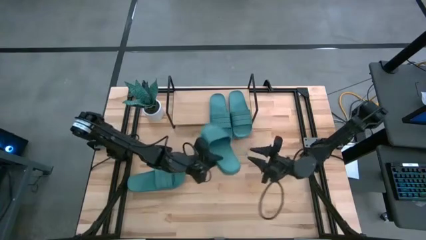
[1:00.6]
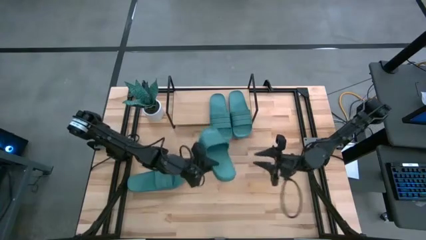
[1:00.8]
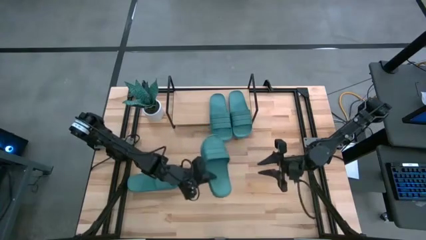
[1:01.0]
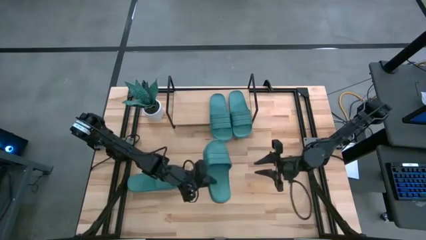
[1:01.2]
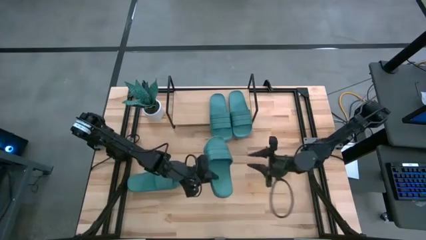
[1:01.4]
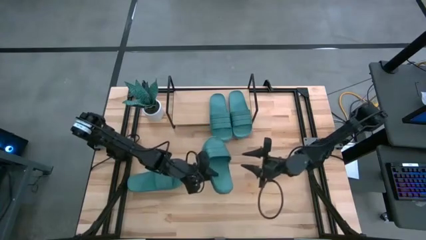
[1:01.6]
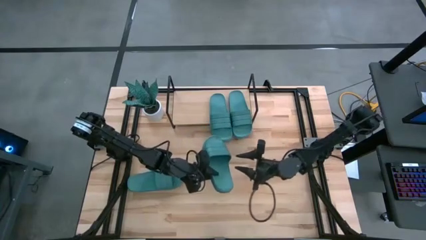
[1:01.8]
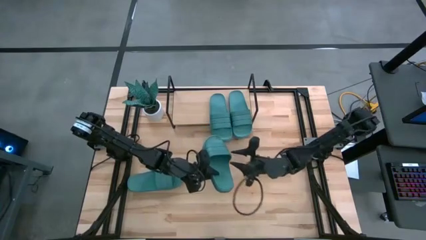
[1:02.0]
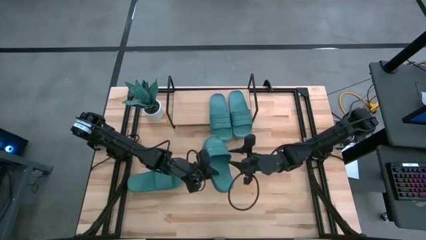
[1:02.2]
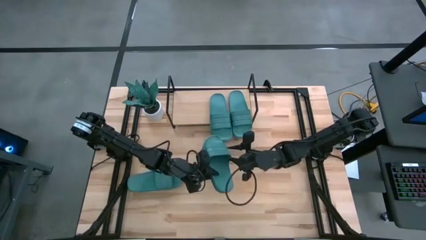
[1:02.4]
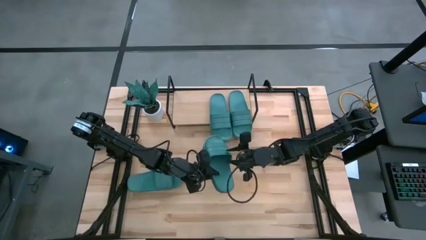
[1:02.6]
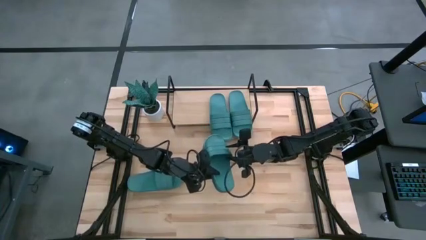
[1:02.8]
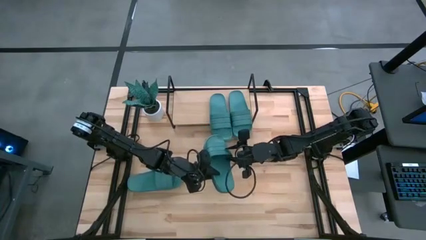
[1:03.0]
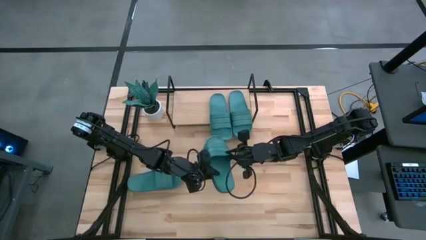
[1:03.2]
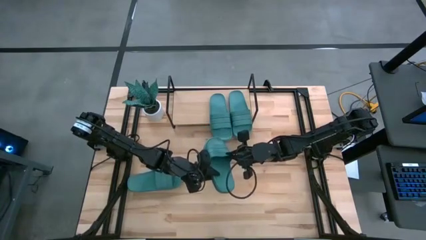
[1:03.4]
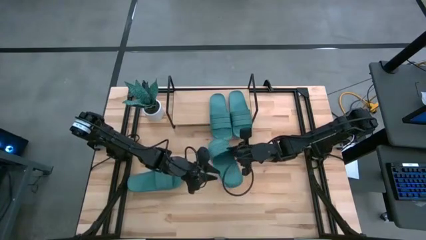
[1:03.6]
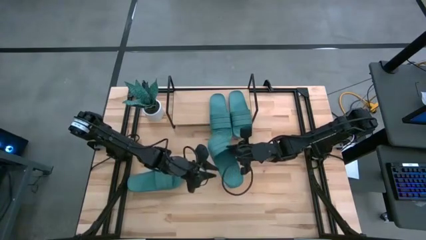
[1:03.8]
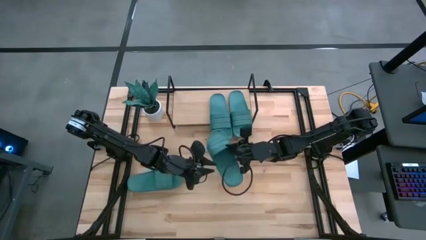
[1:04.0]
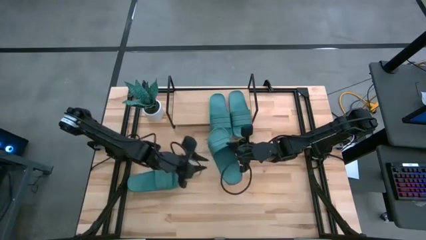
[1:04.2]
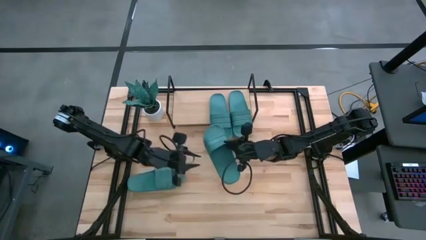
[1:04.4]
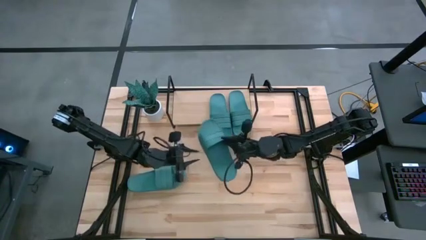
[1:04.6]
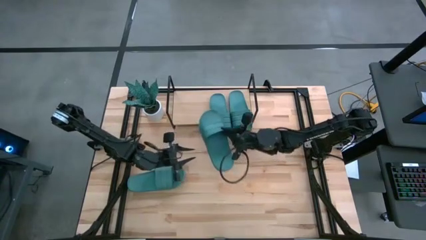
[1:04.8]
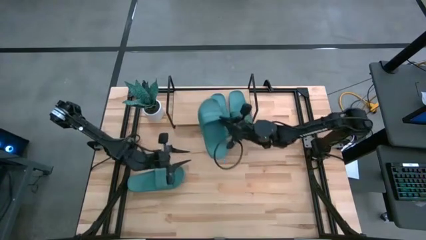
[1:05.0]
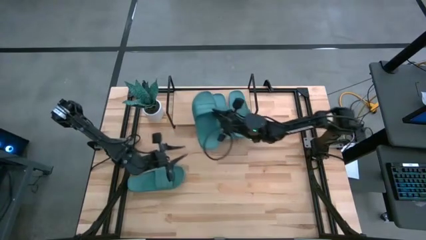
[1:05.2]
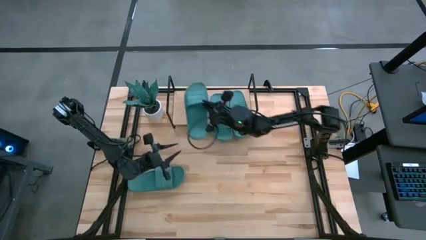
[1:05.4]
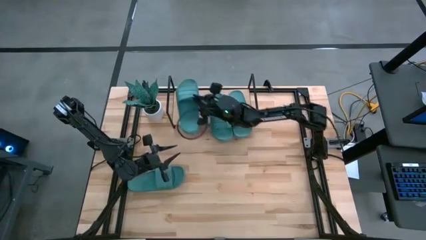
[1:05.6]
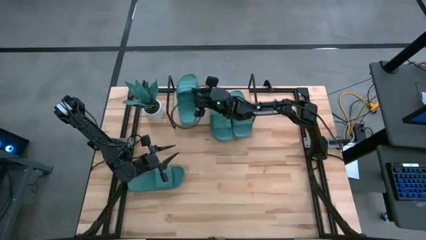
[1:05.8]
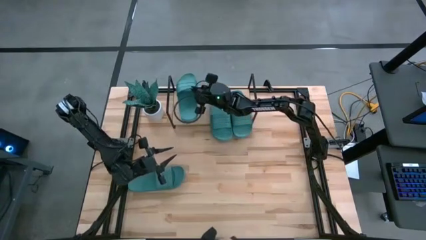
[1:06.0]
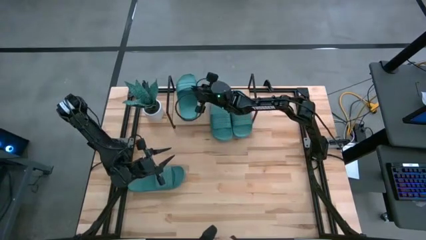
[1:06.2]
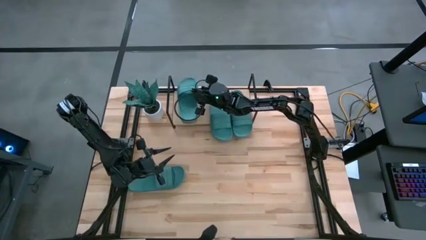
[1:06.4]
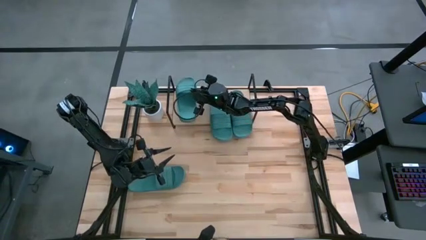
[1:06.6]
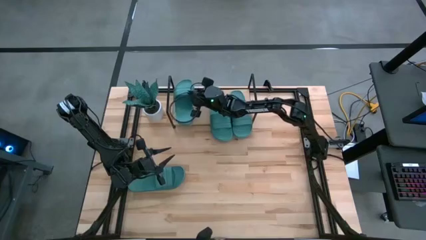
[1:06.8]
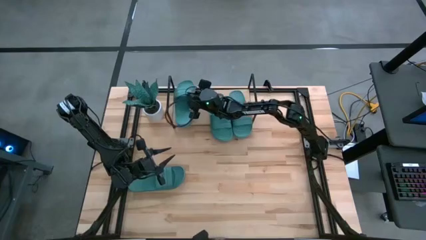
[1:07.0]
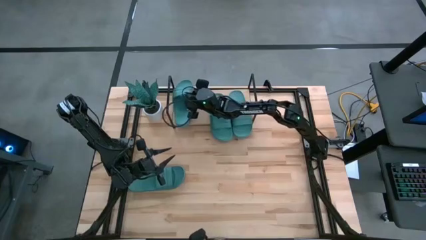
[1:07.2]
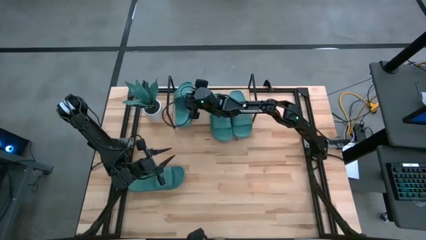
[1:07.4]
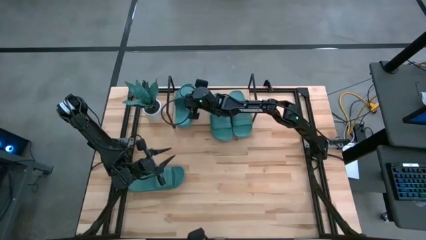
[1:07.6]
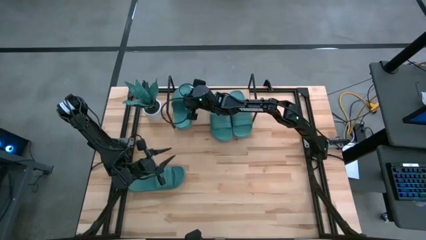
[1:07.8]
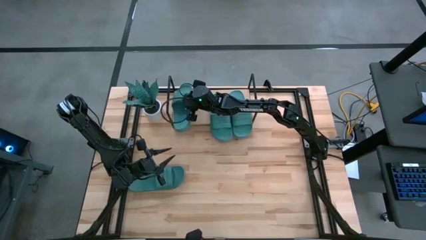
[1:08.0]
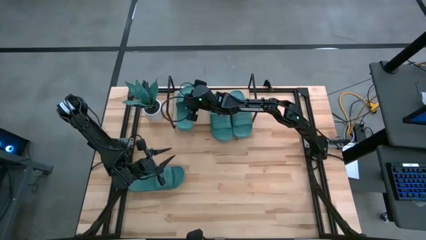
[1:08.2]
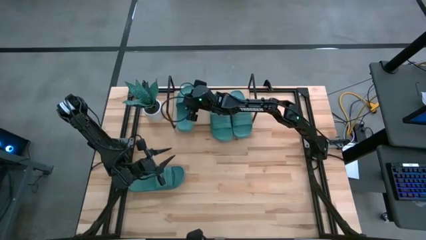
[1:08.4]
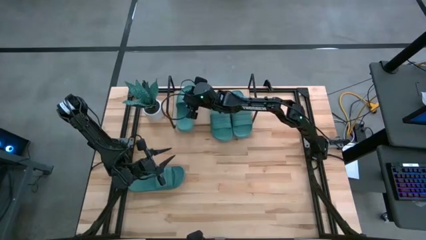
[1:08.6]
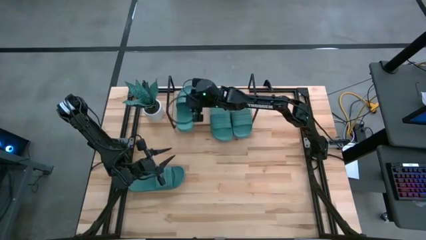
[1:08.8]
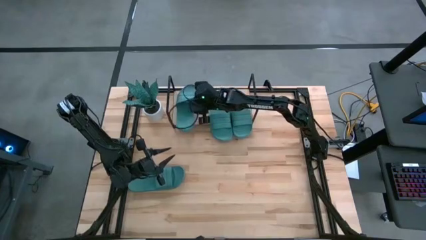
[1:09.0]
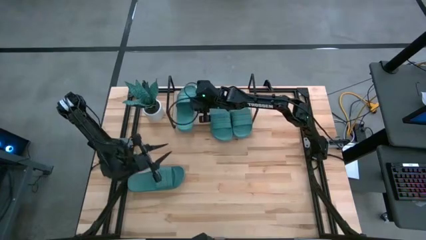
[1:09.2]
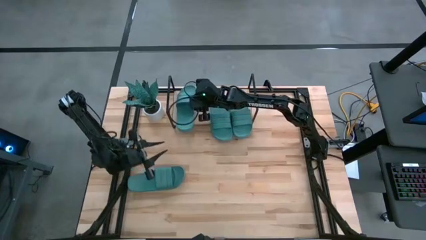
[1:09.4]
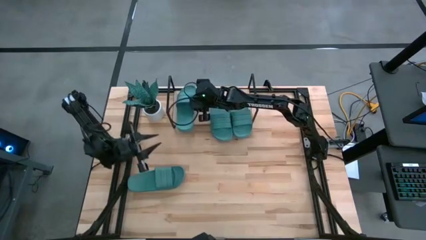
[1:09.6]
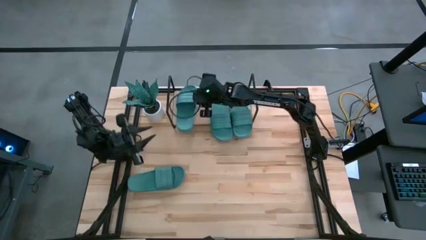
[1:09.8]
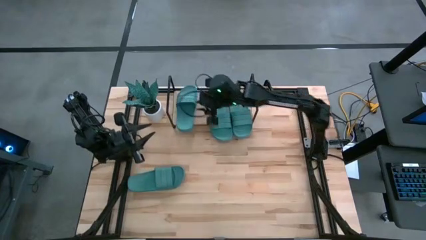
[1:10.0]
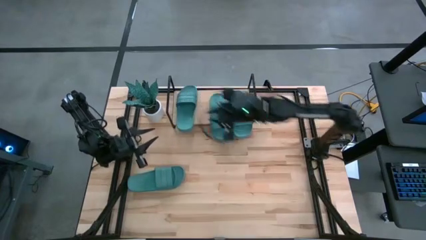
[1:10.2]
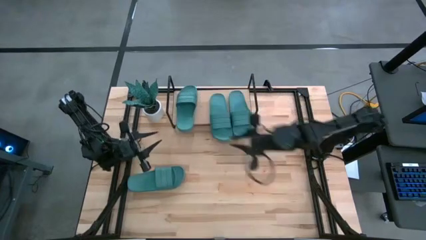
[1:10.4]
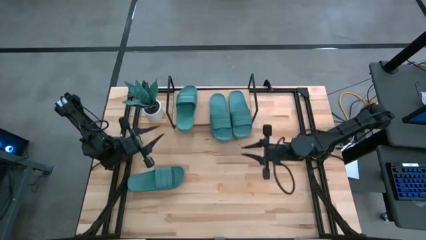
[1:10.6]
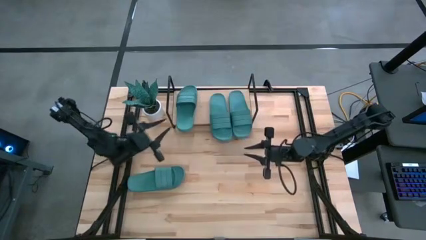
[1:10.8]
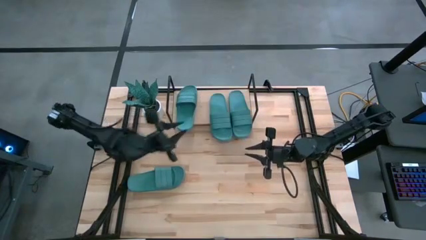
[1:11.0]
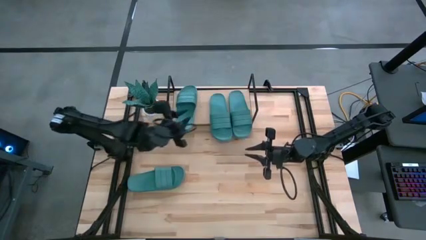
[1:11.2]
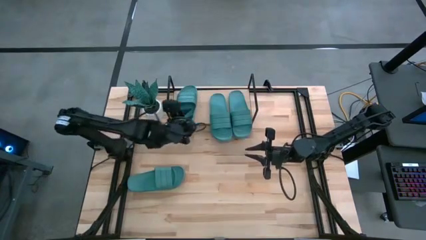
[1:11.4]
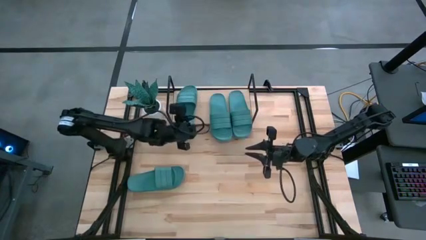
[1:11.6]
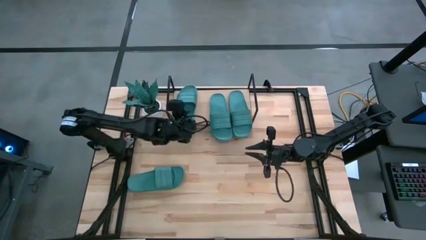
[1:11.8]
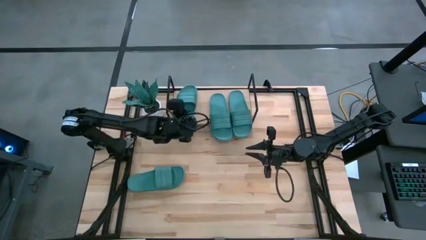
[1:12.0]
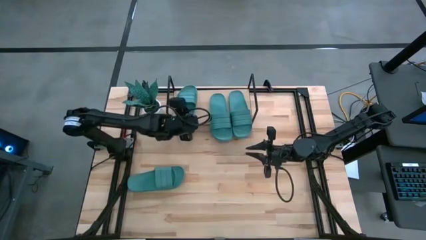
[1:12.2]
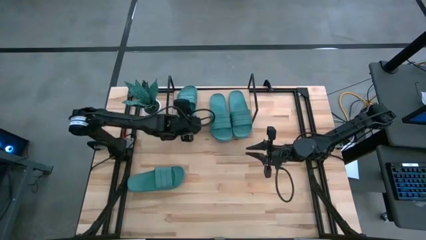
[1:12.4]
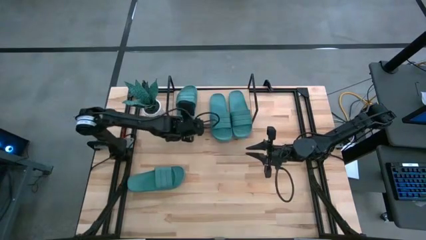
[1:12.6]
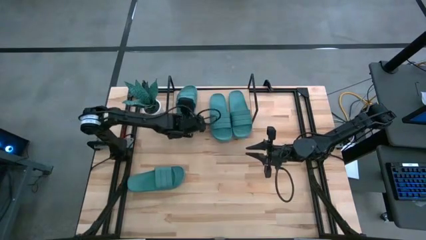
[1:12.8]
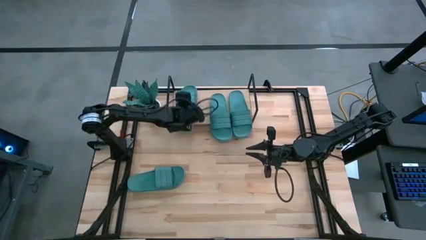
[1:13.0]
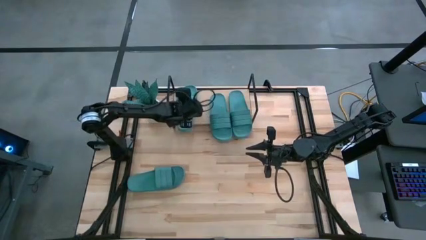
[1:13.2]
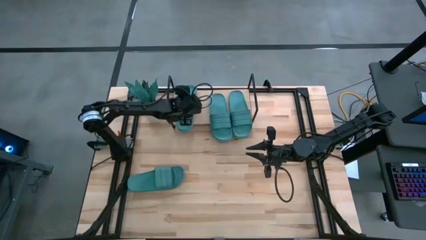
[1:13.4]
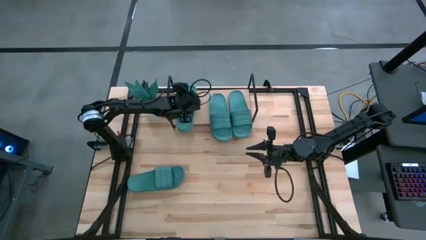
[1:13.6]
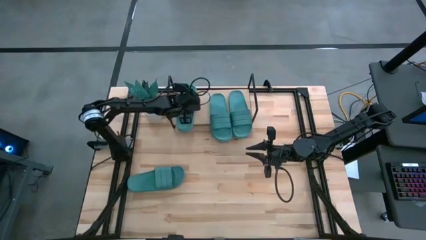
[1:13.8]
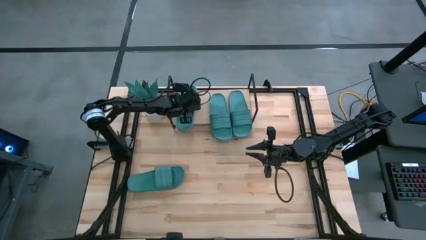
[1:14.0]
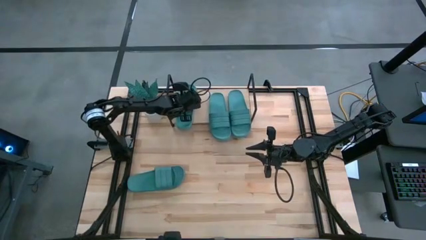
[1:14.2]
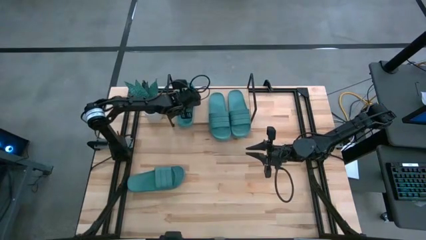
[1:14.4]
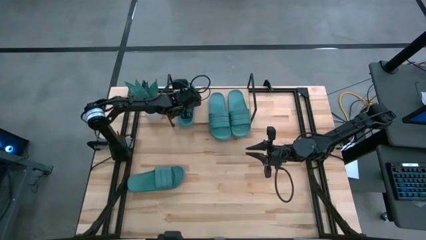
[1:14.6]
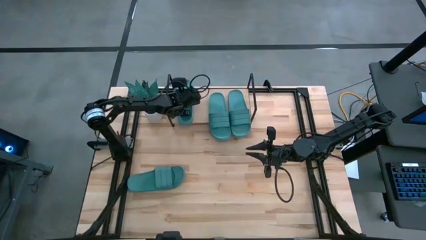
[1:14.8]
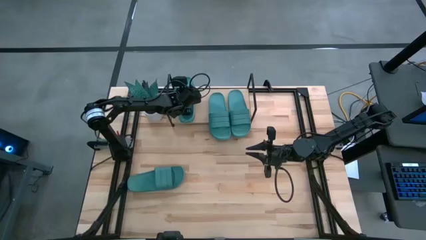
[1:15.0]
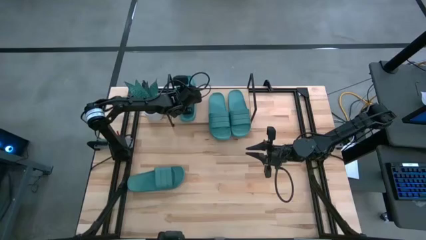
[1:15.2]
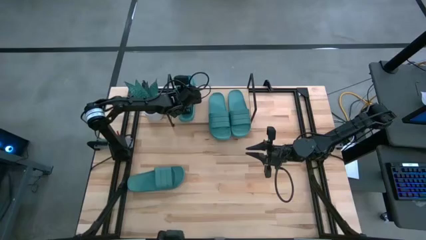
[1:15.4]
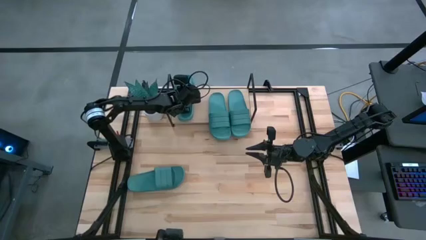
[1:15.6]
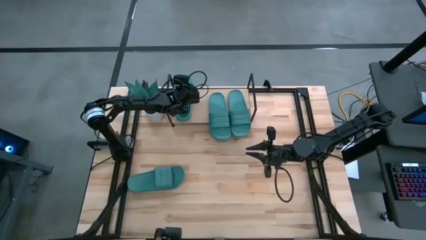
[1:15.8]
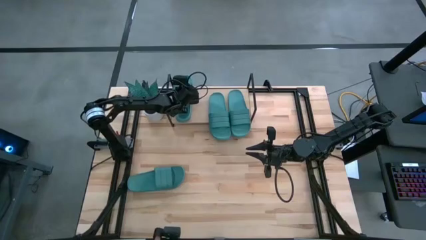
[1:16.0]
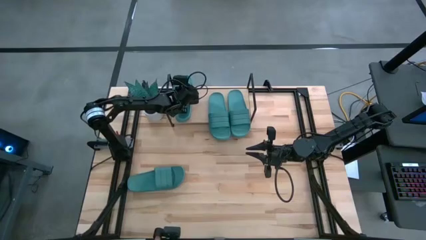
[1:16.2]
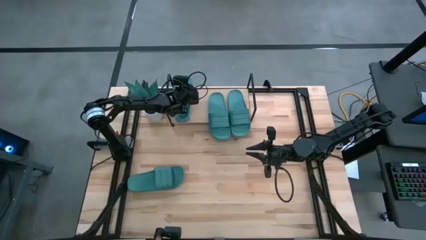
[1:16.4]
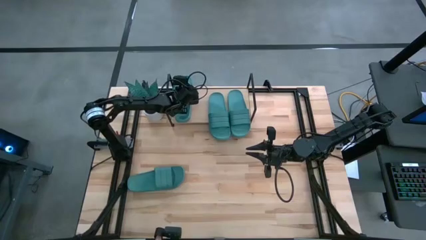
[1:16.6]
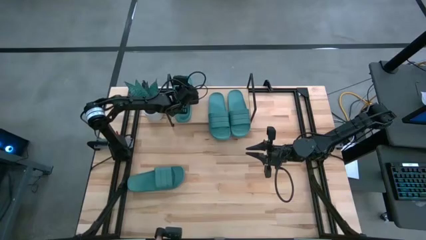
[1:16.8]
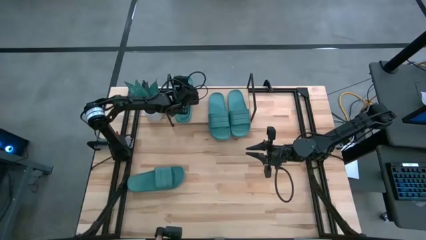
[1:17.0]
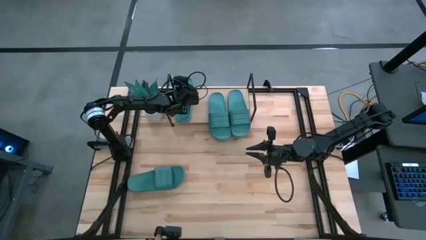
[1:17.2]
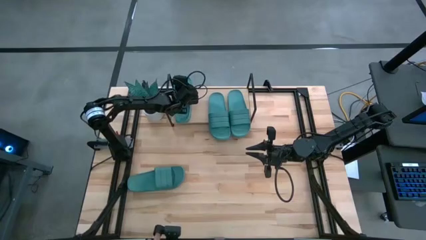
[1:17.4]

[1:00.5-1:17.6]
Task: Pick and place slides into the shelf
Put the slipper on the shelf
